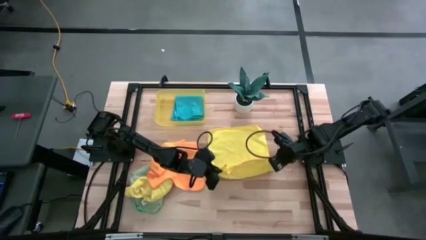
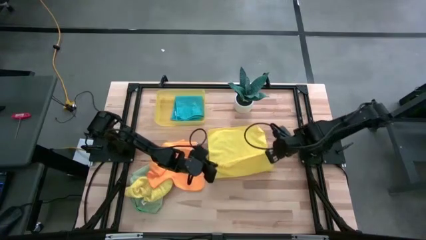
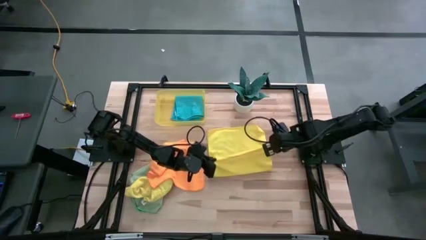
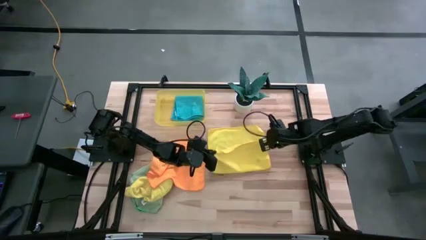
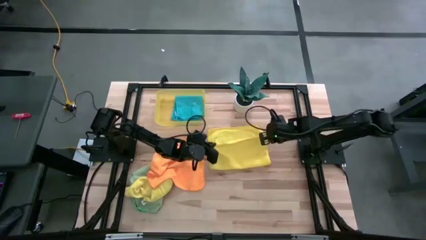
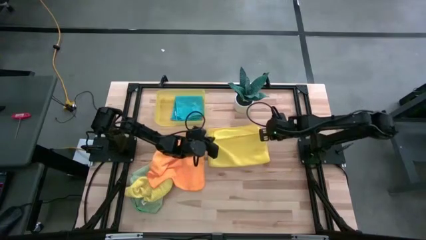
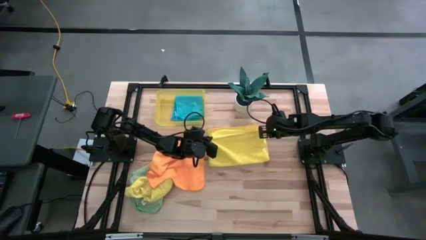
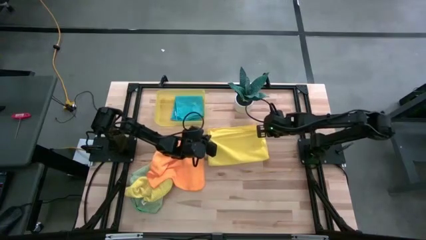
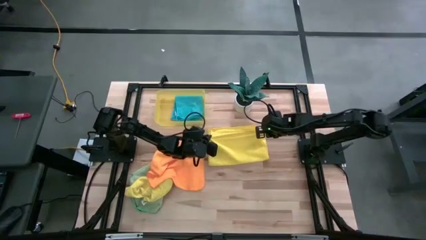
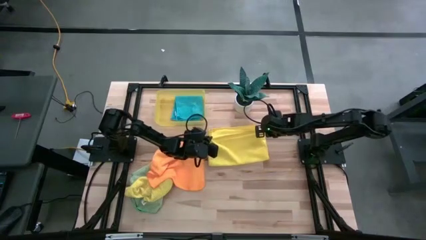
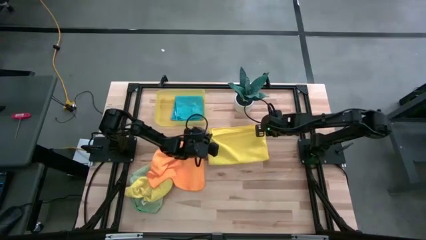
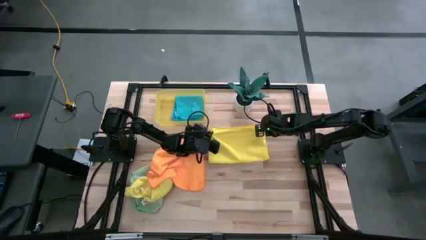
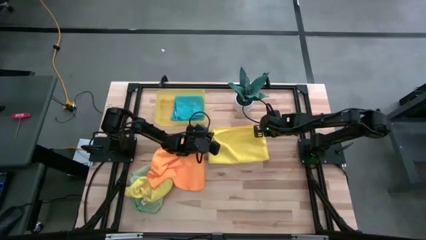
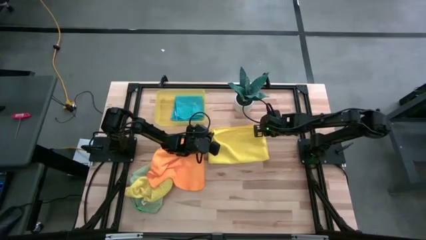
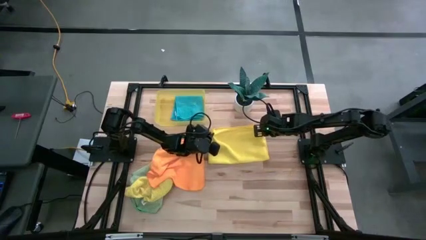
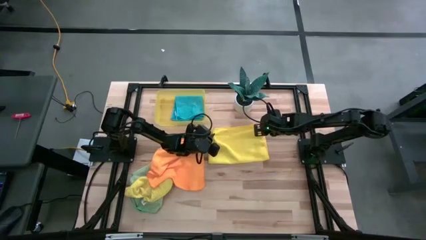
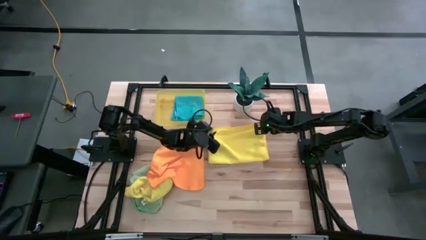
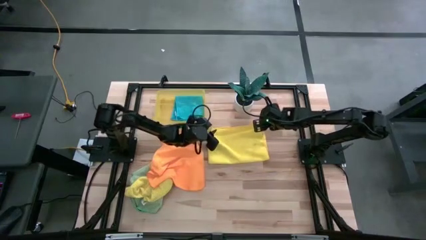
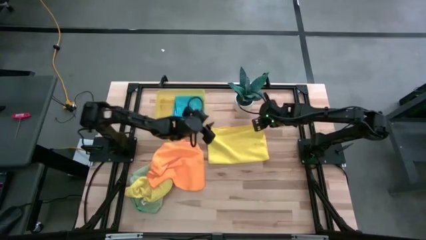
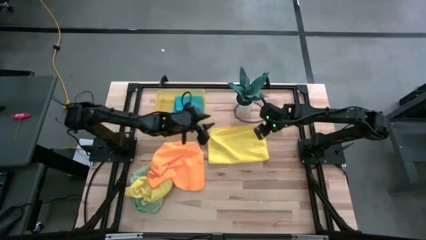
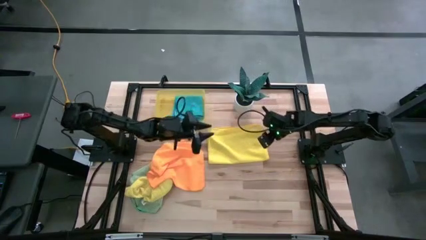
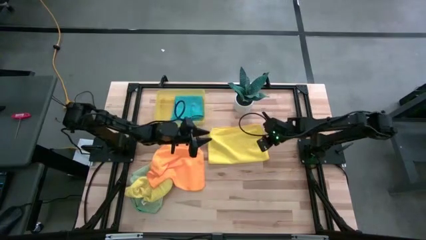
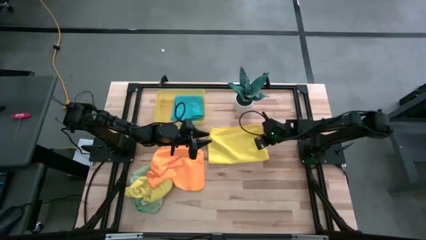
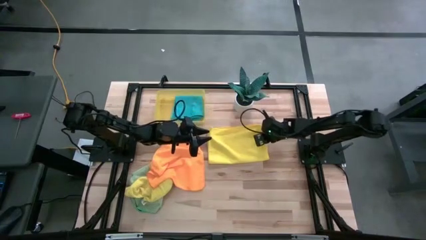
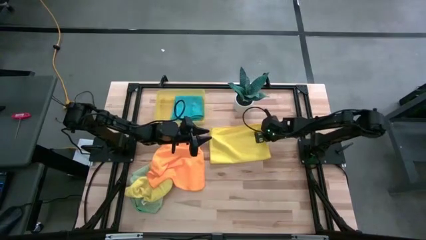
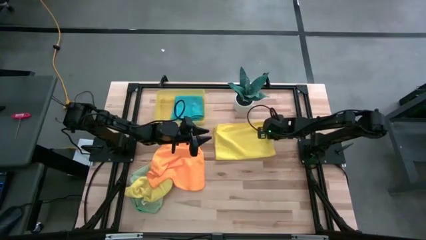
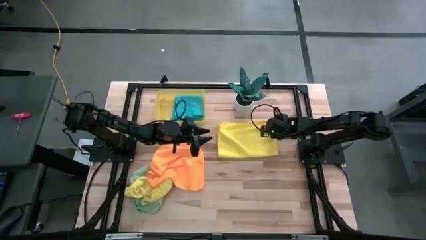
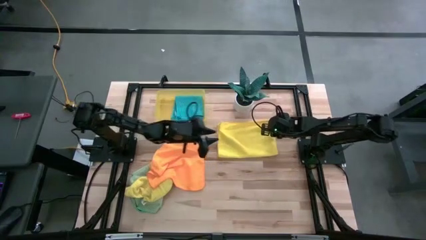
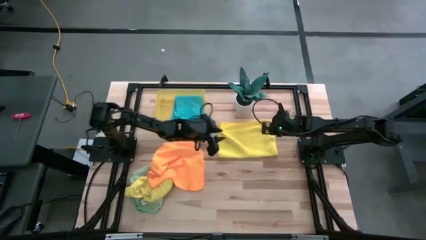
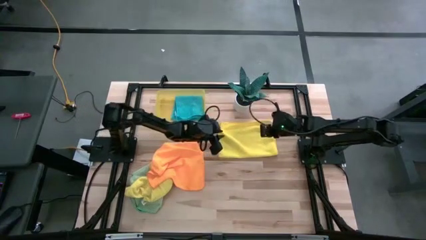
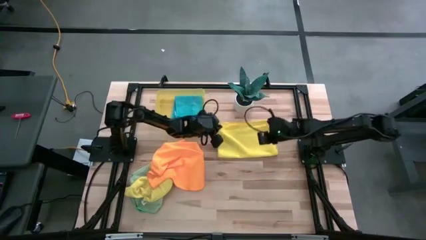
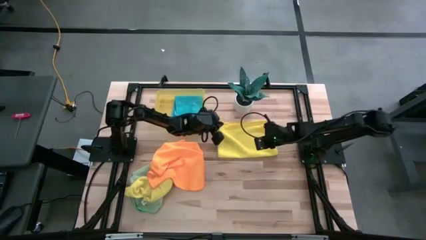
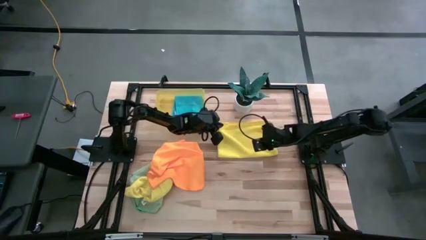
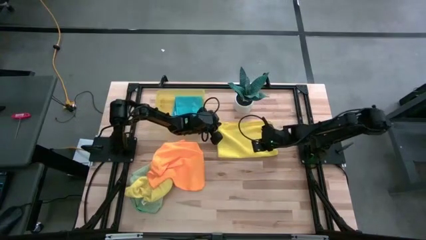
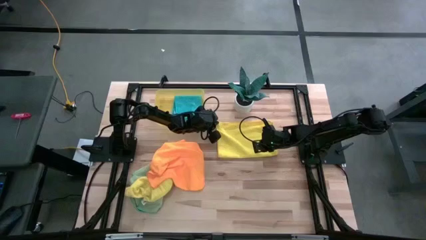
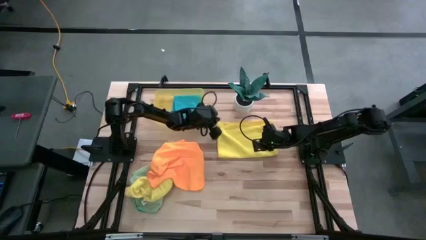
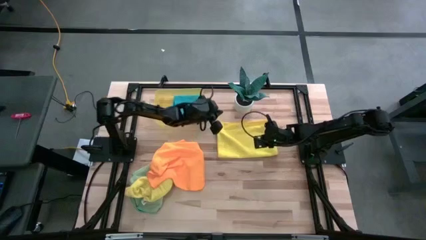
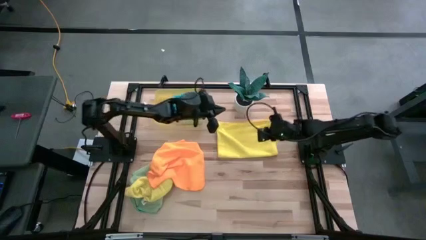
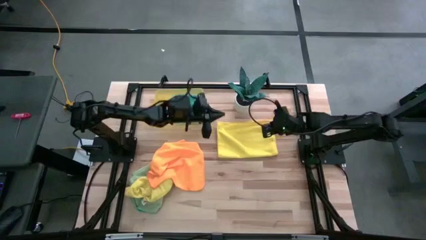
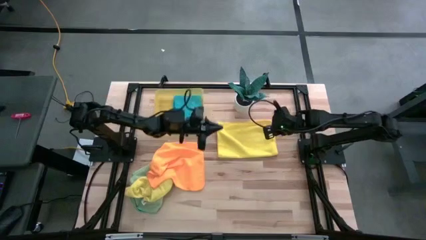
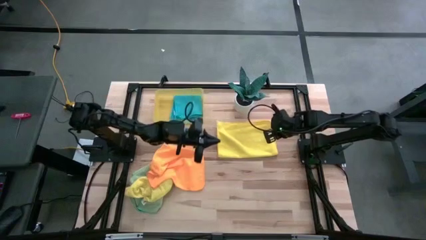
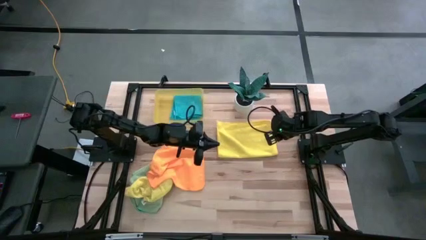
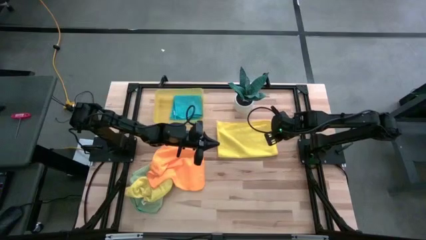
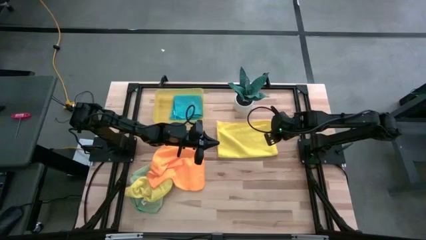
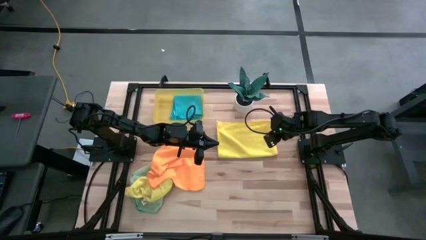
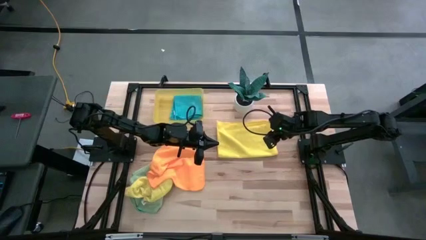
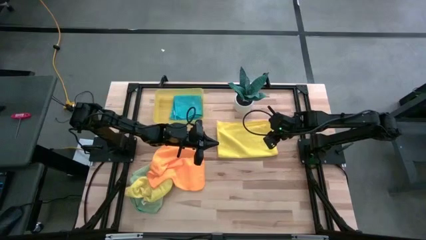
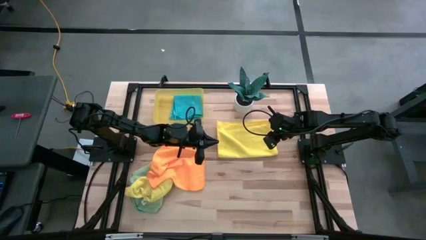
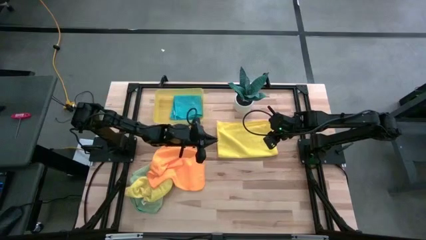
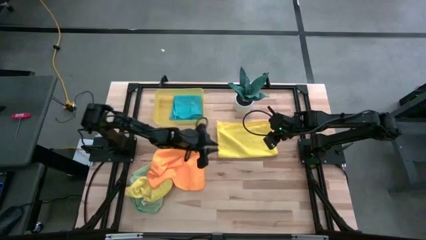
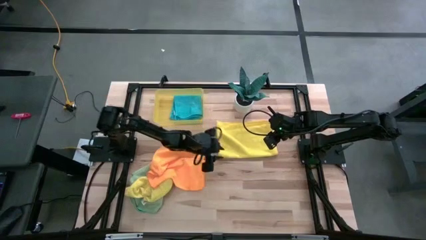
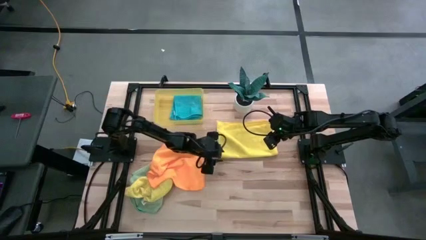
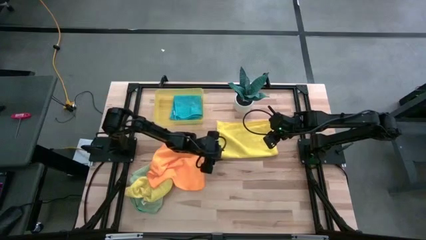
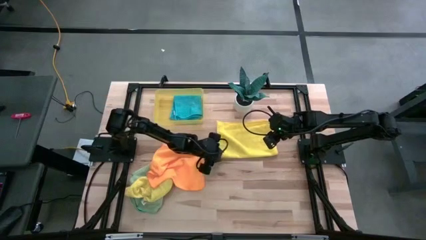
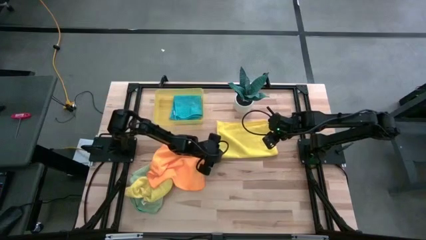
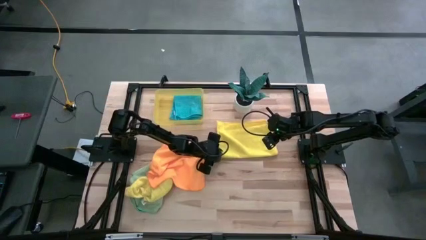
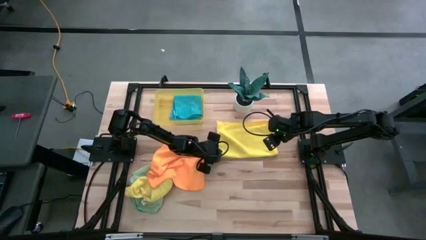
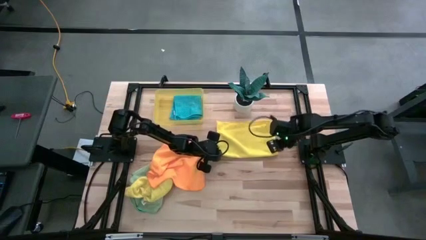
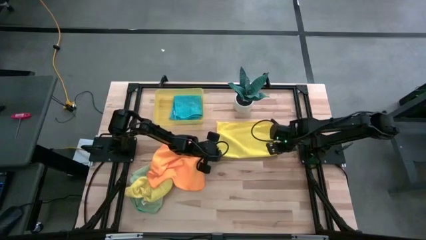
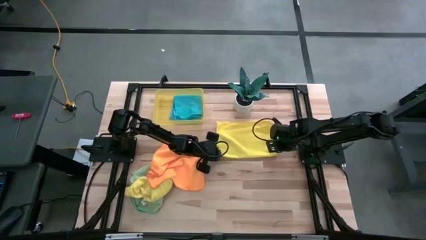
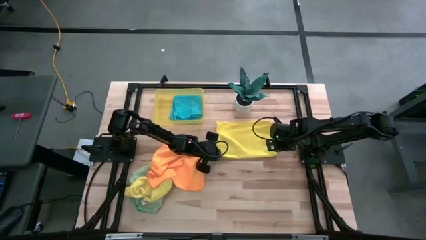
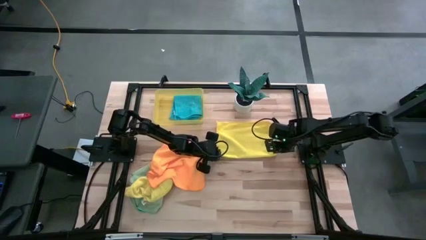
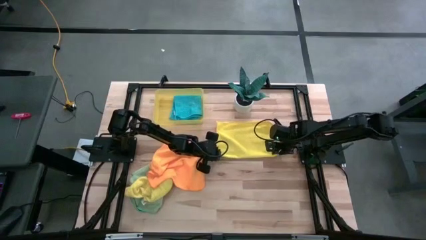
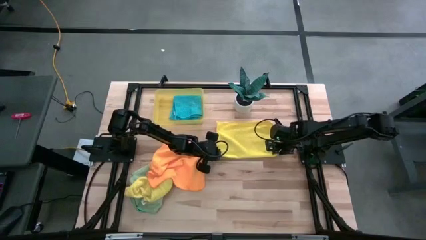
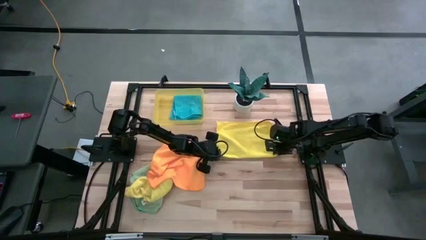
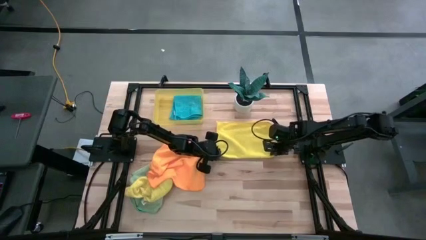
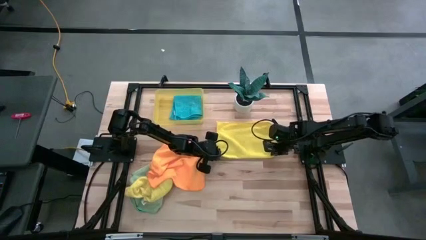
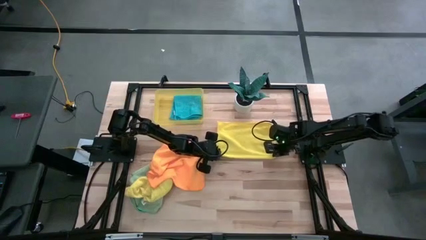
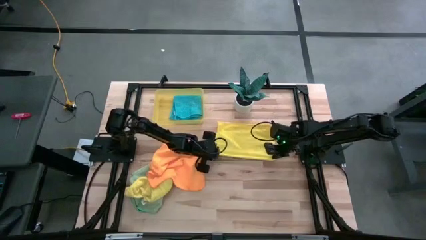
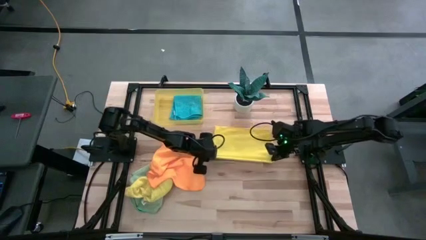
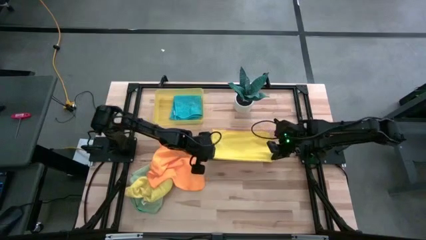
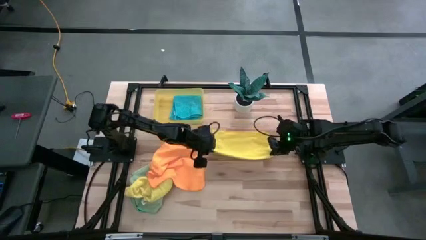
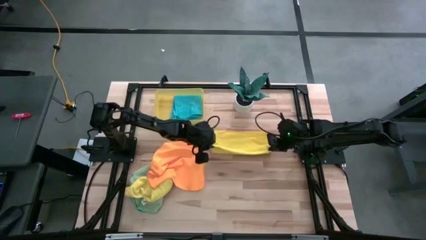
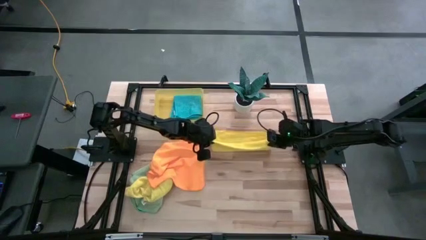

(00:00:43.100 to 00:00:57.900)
Task: Fold microfiber towels
Fold the right yellow microfiber cloth
